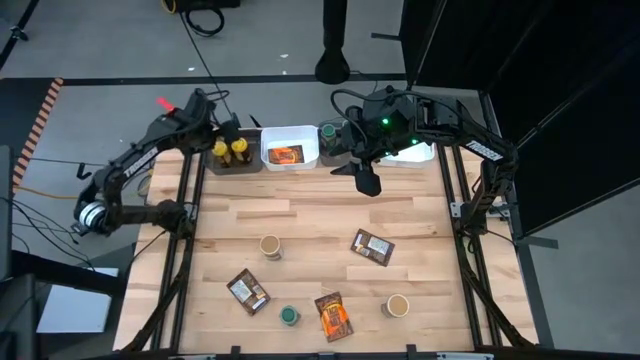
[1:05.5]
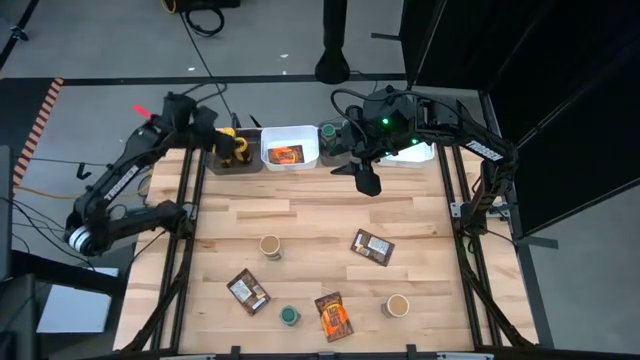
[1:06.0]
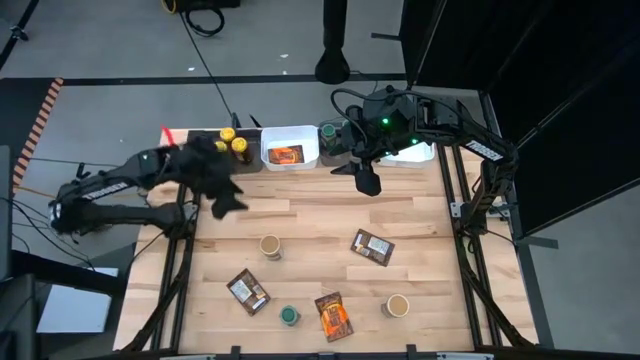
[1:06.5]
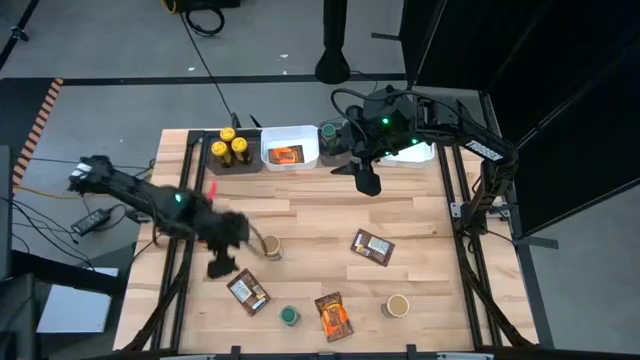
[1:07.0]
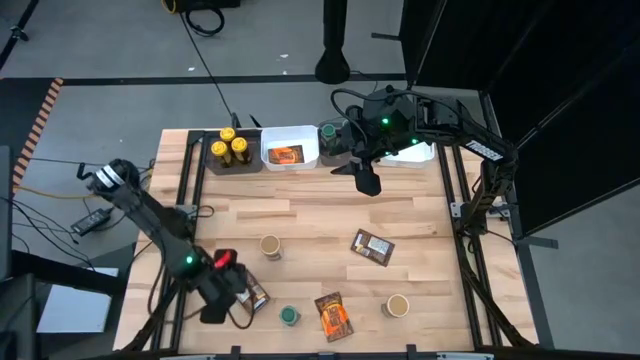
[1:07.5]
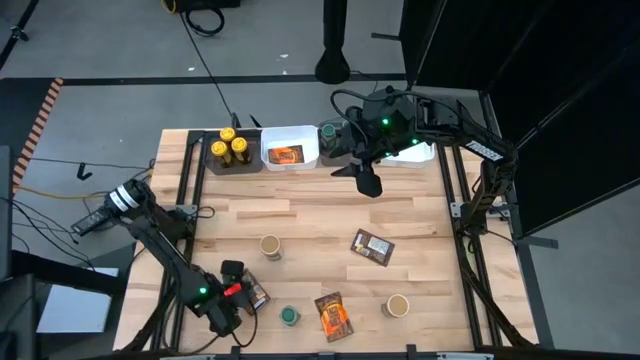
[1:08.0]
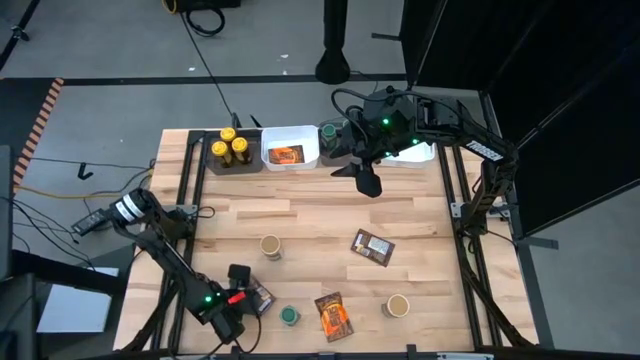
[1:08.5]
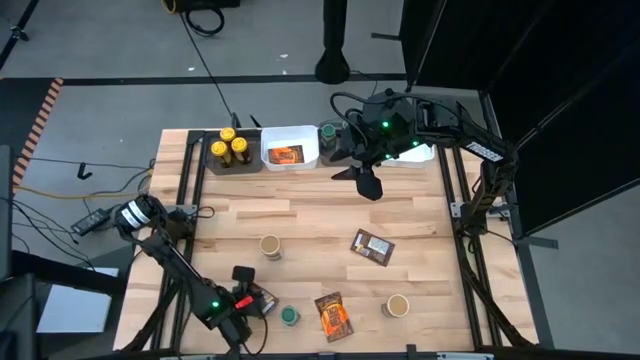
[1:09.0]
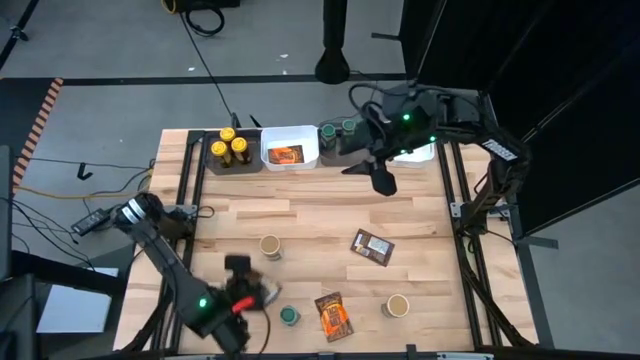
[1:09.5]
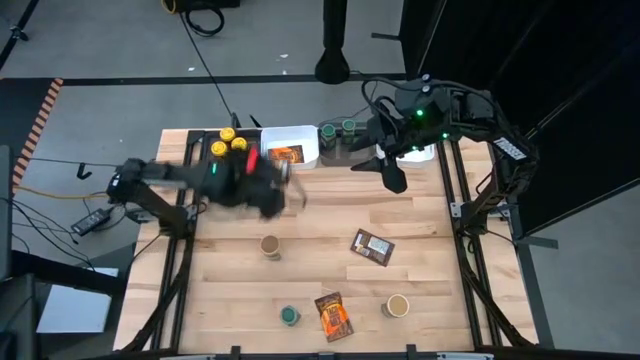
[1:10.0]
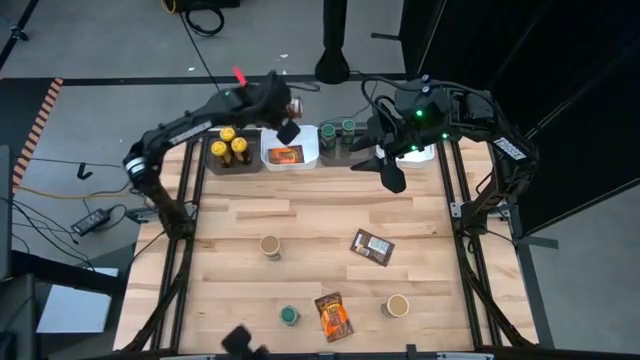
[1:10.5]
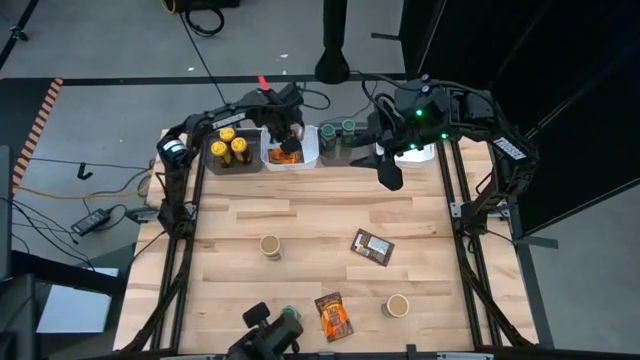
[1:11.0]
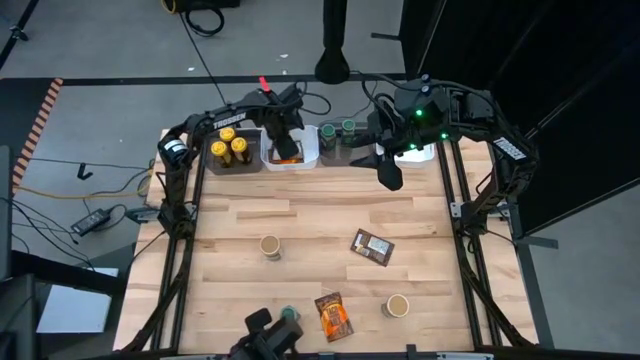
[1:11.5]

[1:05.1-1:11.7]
Task: Sort spices by type
Put the bottom left orange seasoning pack into the left white bin

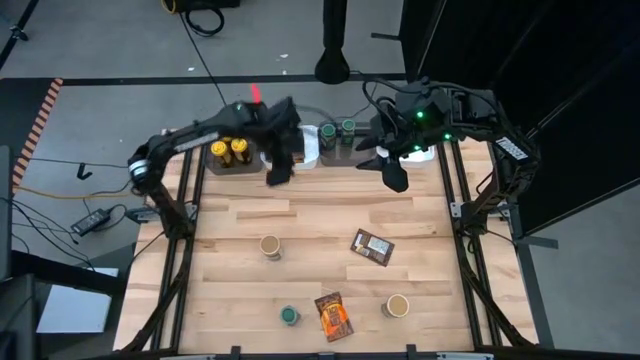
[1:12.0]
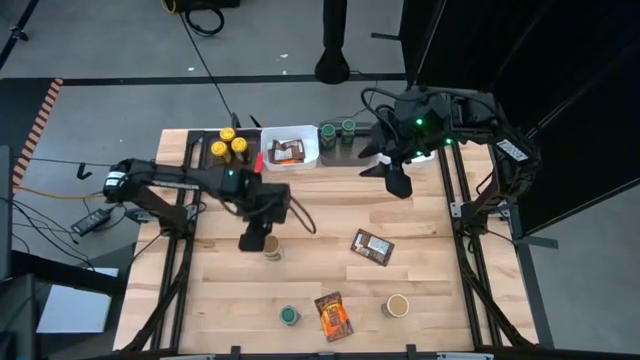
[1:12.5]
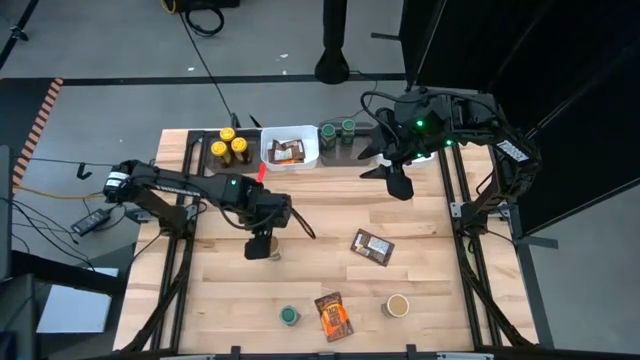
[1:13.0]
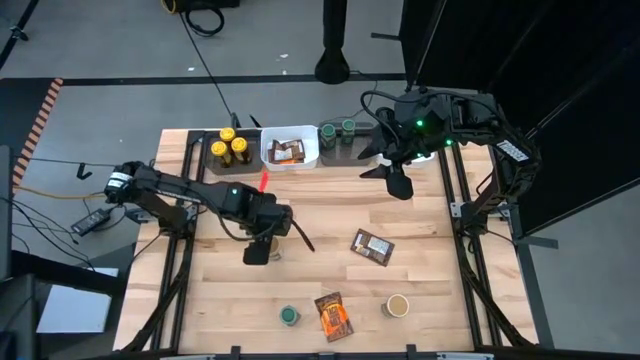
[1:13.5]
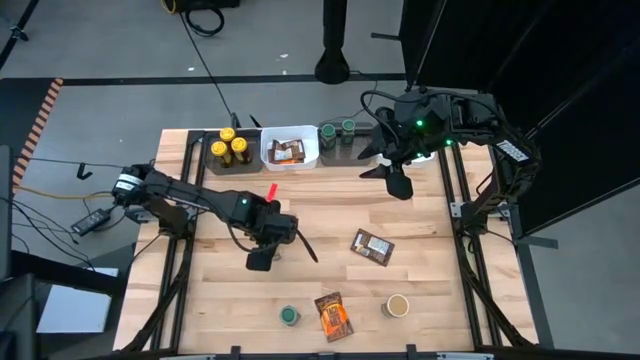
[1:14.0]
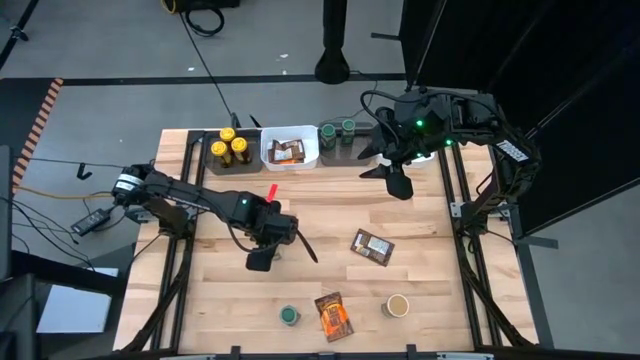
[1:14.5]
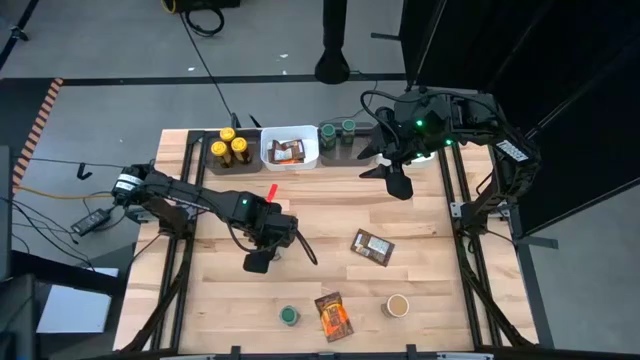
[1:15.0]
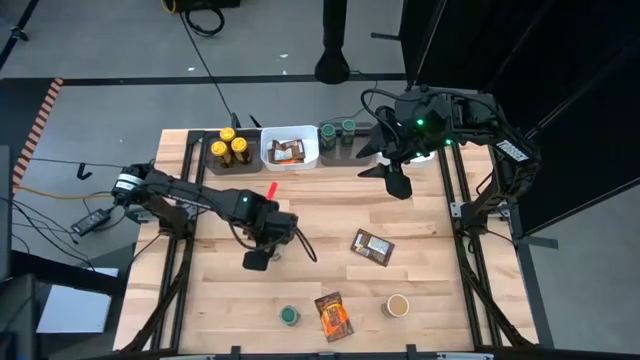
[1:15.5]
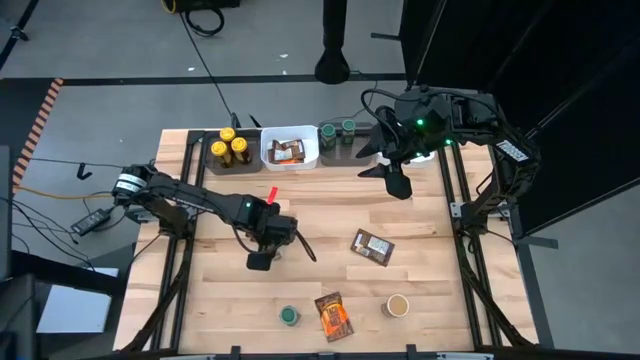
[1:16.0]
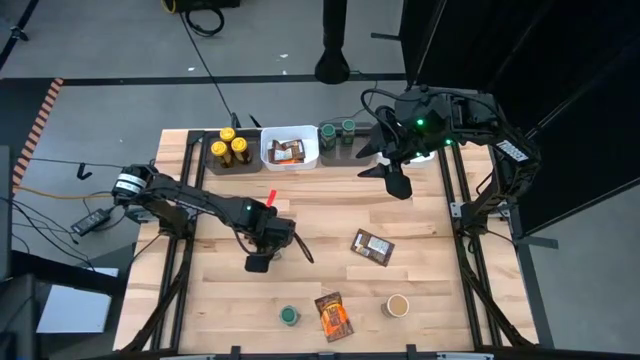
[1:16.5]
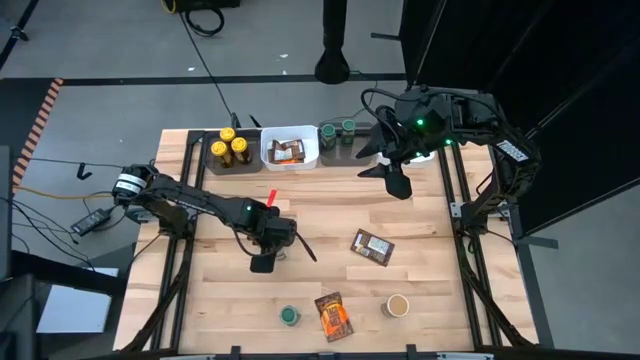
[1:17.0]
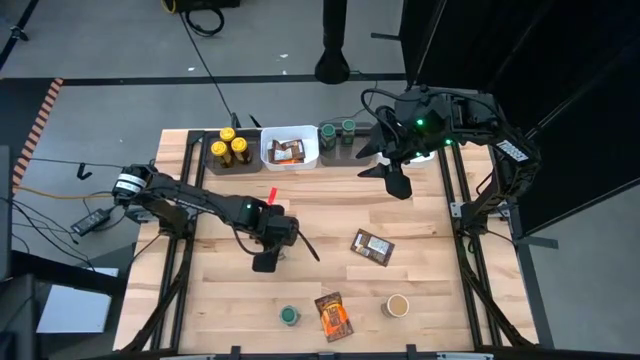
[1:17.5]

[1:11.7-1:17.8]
Put the left brown seasoning bottle into the right white bin

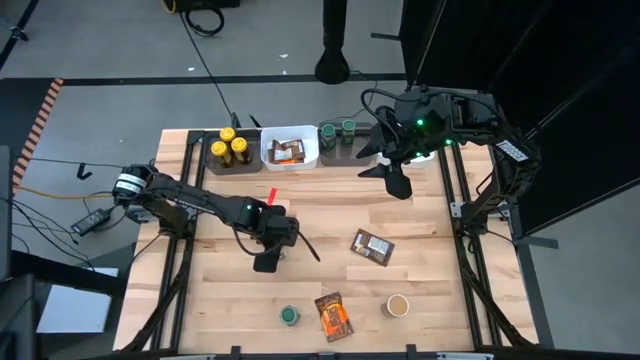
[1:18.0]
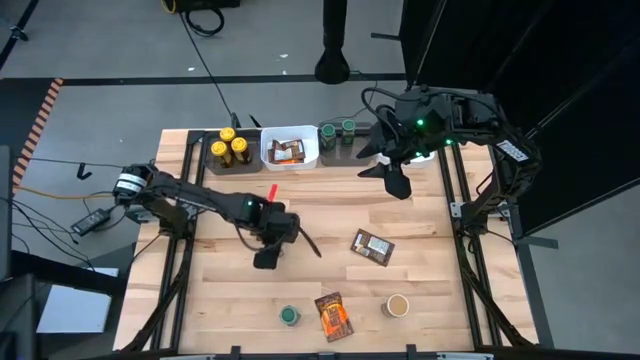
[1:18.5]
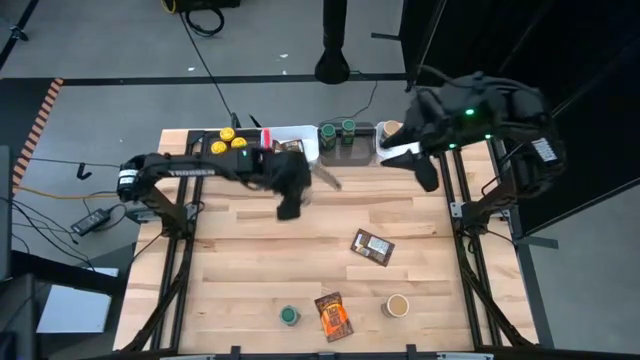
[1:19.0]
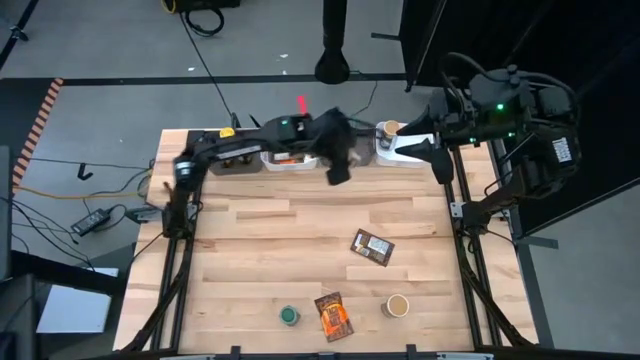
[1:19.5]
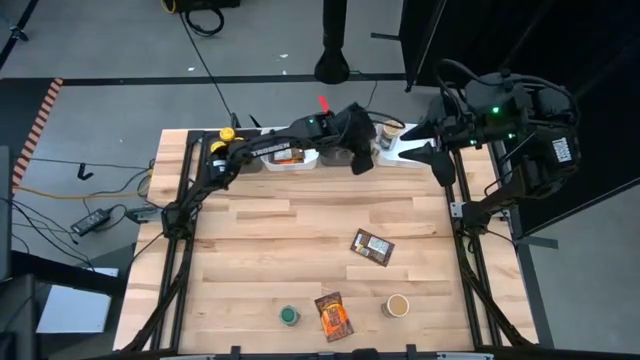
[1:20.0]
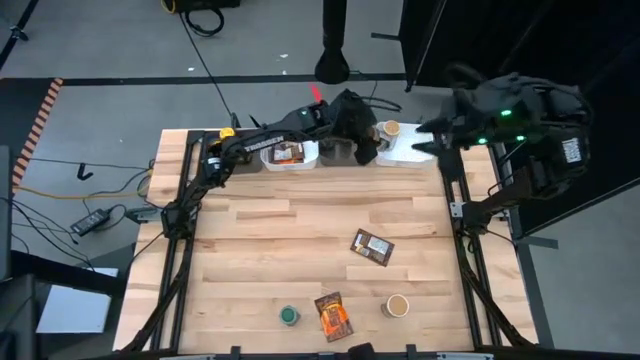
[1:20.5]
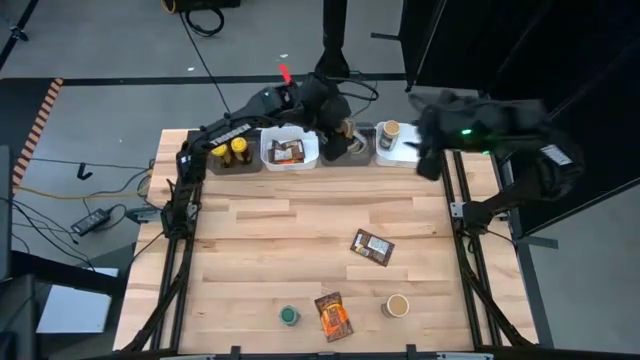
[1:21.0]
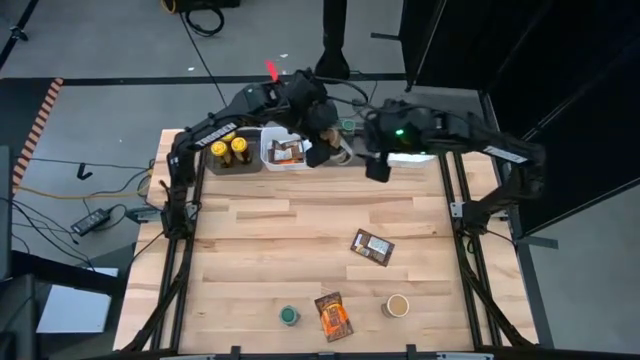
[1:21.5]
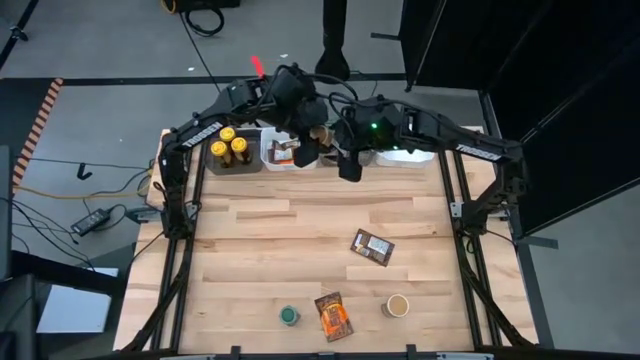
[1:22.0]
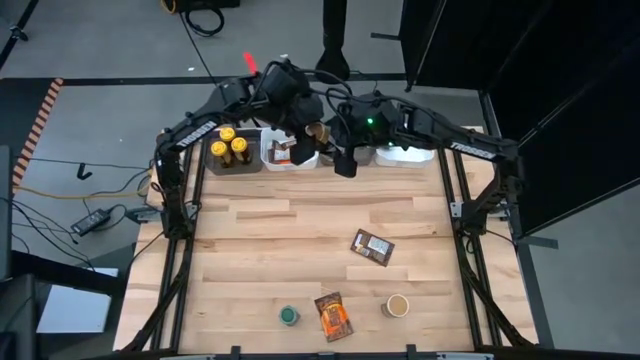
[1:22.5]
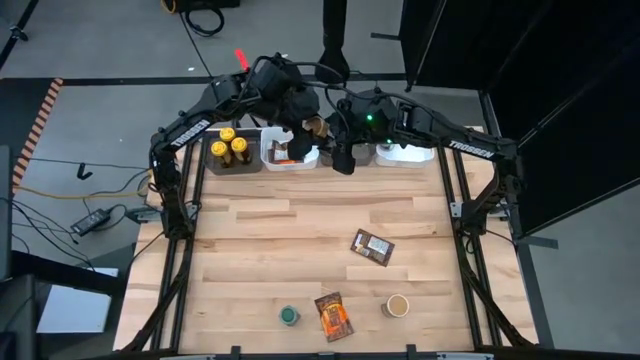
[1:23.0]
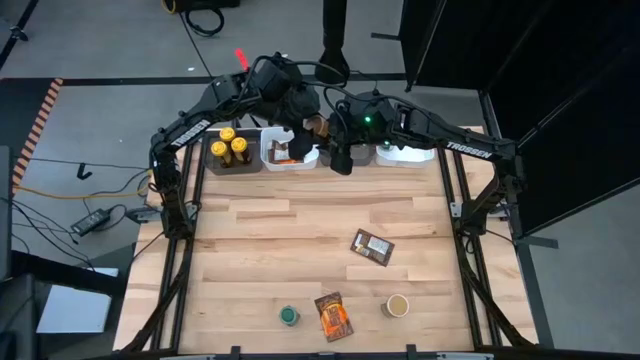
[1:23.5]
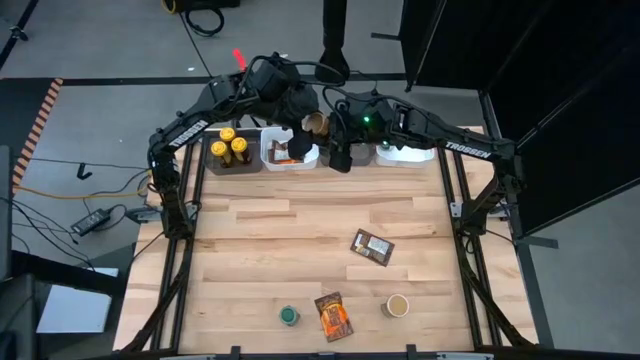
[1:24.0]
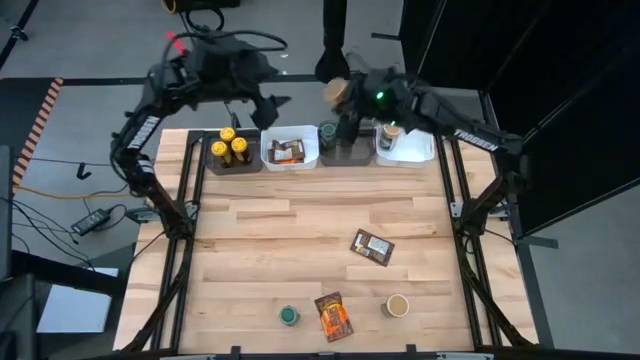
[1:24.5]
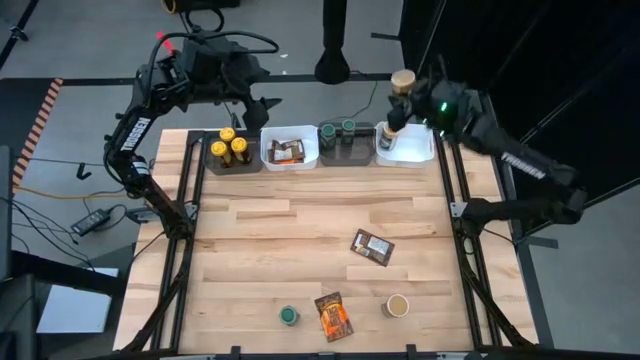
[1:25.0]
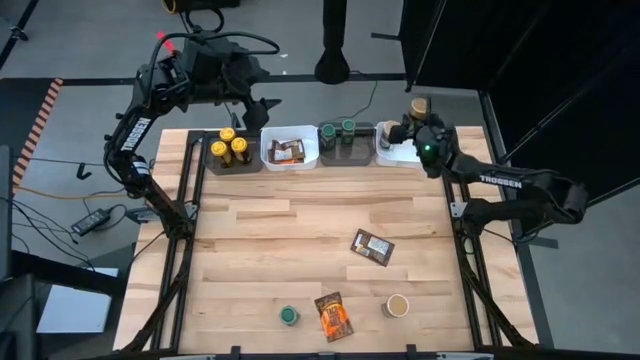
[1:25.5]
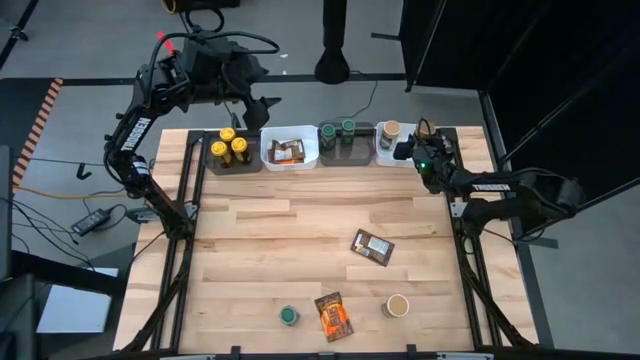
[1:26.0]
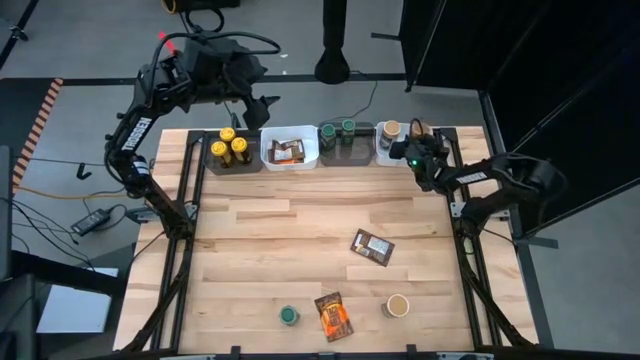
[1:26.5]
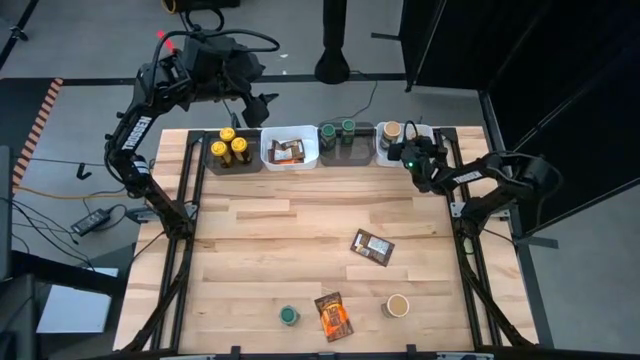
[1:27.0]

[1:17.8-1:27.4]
Put the left brown seasoning bottle into the right white bin
